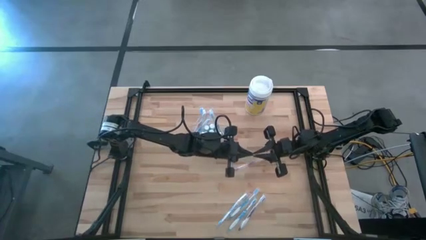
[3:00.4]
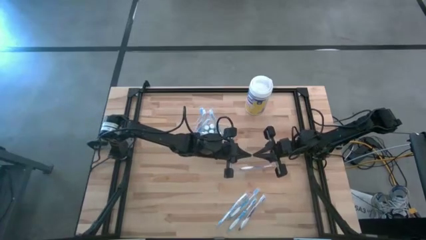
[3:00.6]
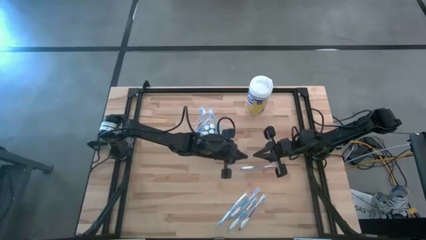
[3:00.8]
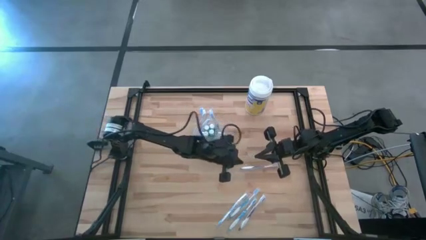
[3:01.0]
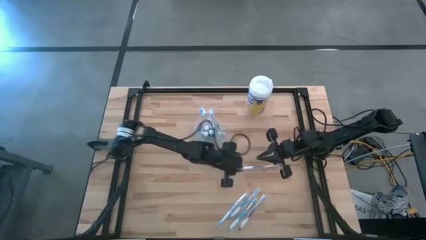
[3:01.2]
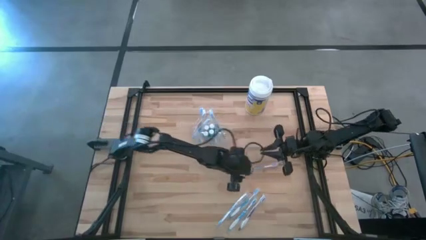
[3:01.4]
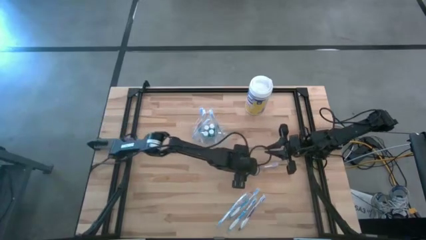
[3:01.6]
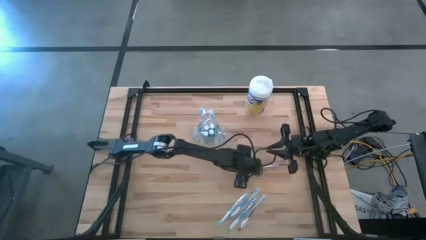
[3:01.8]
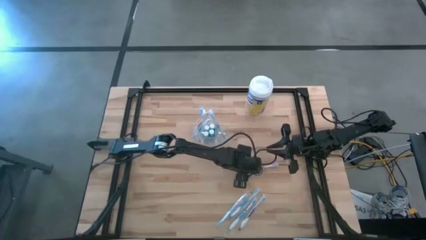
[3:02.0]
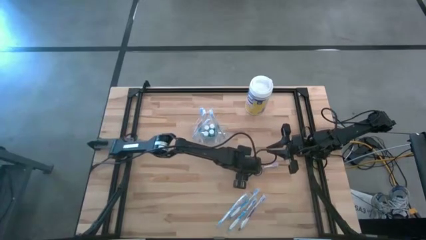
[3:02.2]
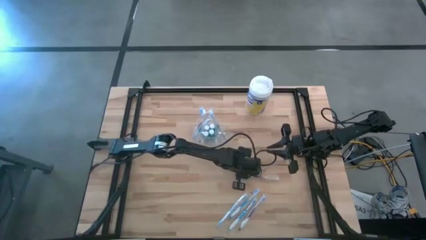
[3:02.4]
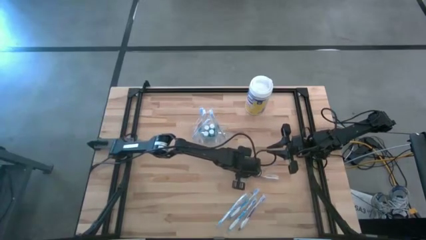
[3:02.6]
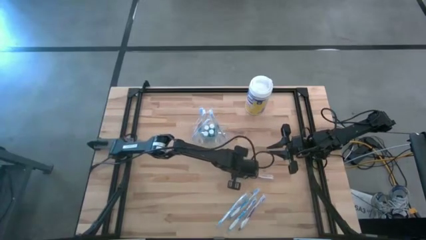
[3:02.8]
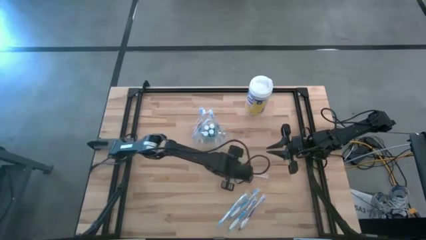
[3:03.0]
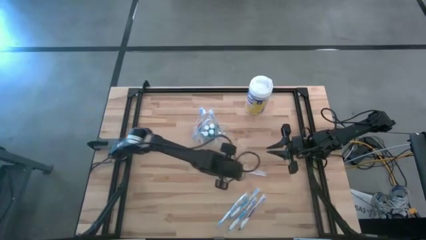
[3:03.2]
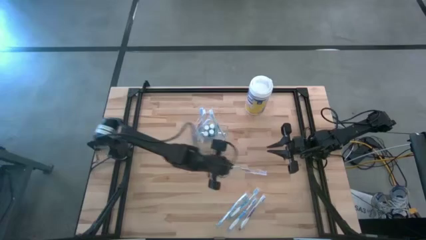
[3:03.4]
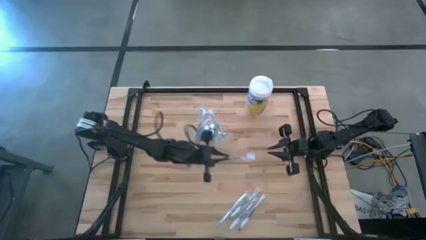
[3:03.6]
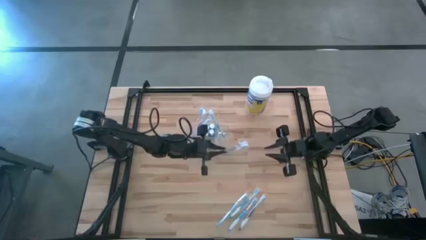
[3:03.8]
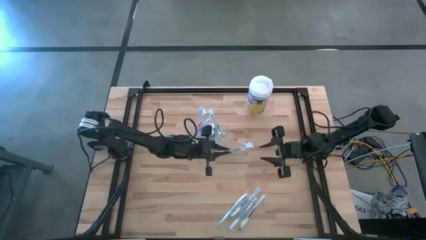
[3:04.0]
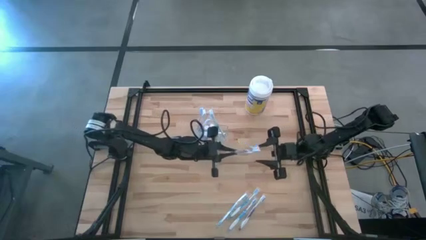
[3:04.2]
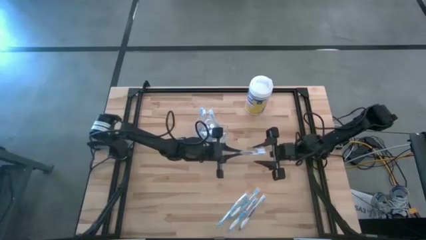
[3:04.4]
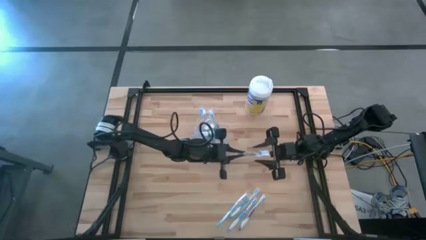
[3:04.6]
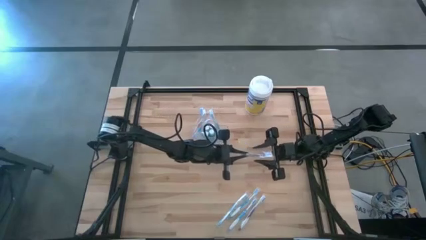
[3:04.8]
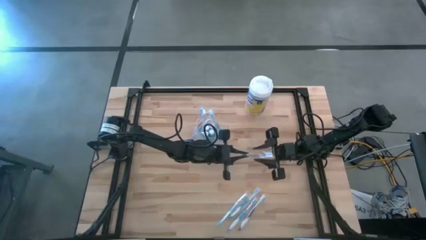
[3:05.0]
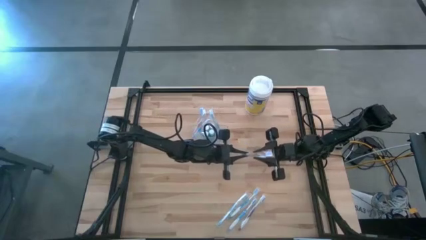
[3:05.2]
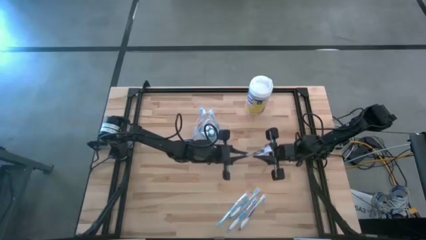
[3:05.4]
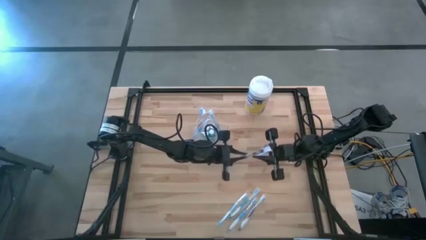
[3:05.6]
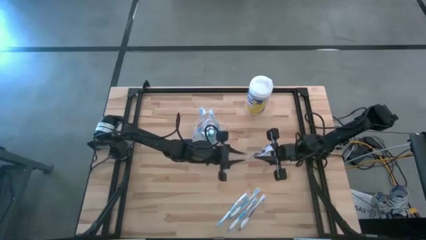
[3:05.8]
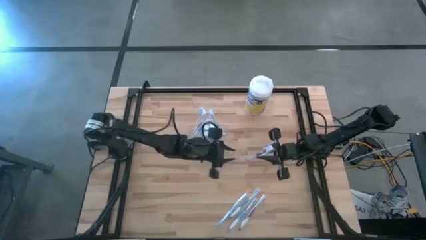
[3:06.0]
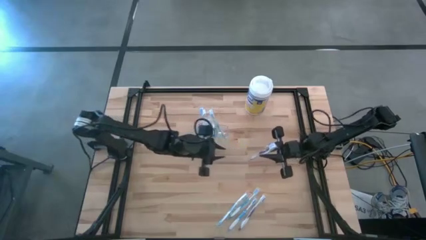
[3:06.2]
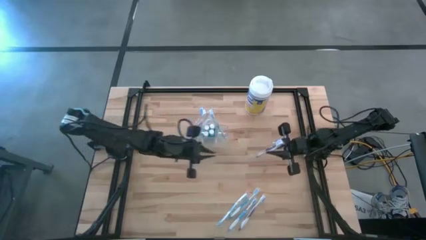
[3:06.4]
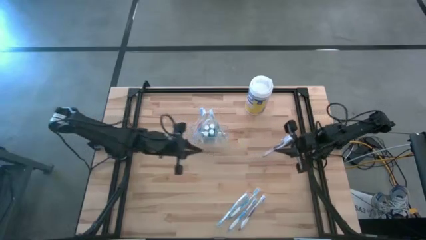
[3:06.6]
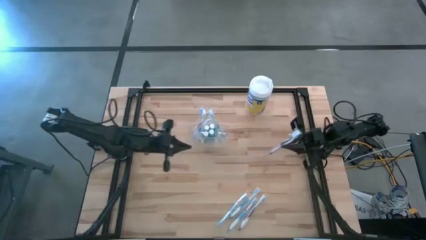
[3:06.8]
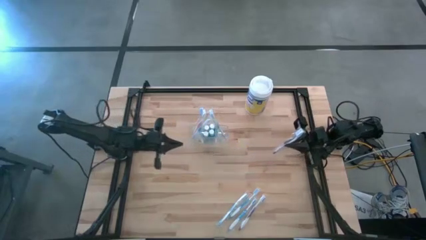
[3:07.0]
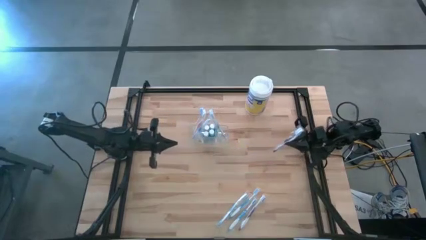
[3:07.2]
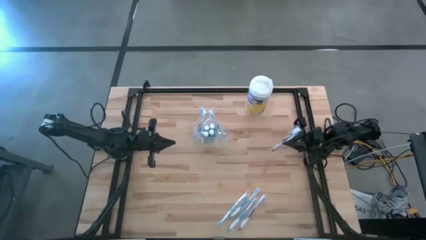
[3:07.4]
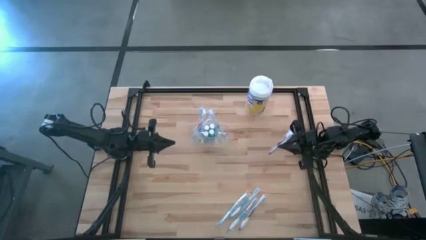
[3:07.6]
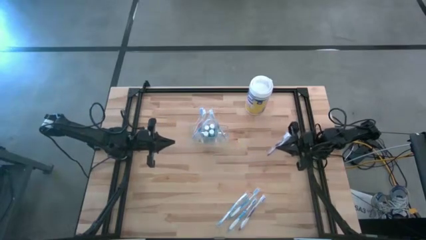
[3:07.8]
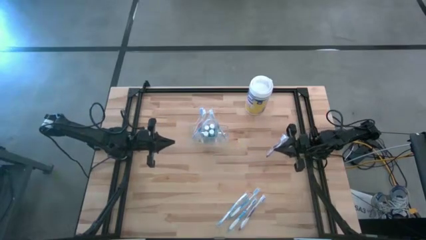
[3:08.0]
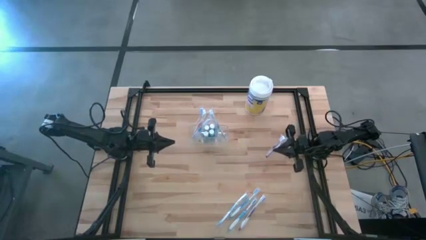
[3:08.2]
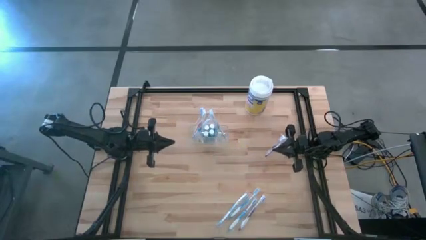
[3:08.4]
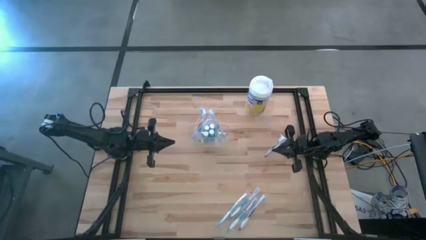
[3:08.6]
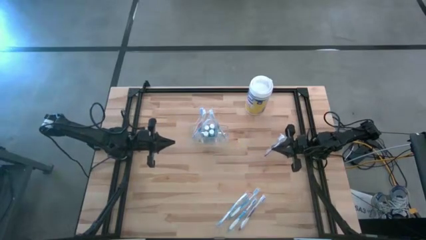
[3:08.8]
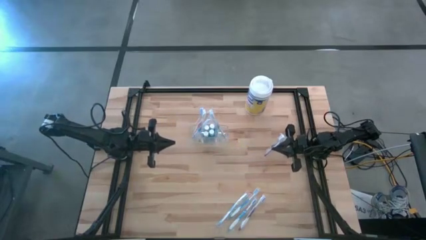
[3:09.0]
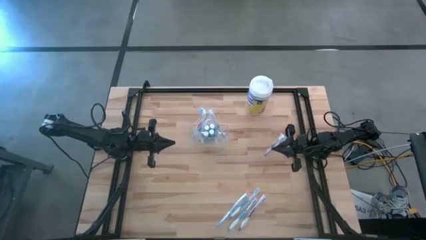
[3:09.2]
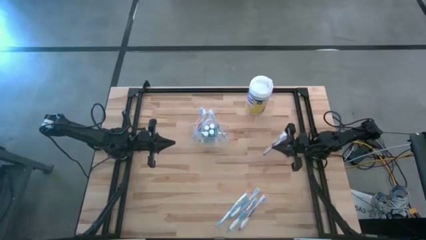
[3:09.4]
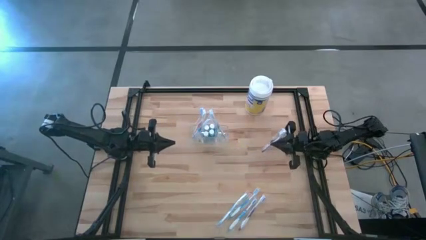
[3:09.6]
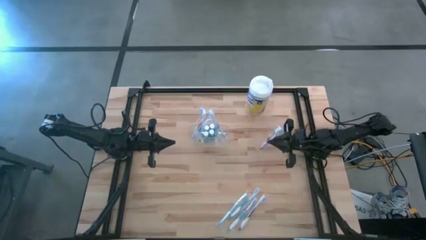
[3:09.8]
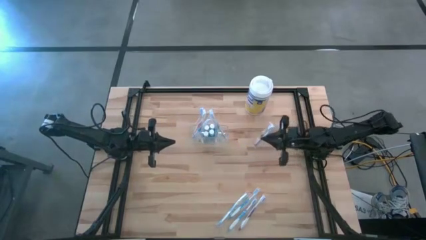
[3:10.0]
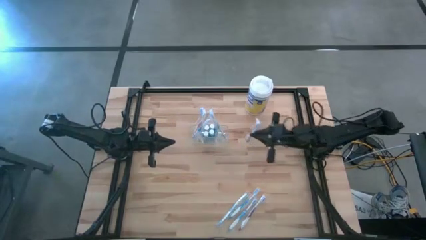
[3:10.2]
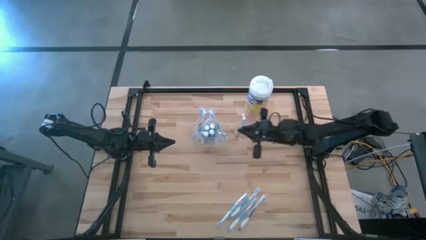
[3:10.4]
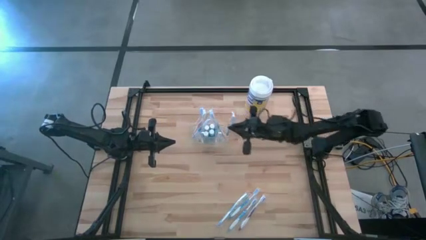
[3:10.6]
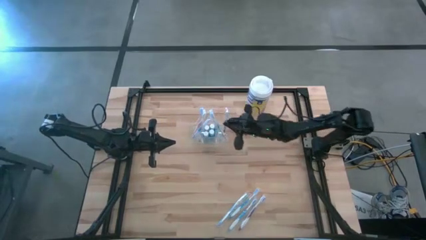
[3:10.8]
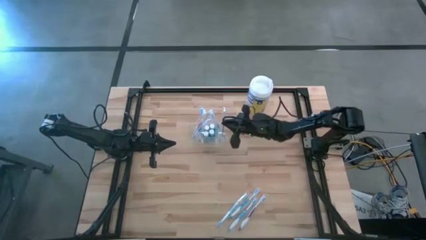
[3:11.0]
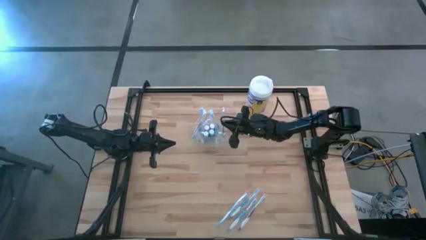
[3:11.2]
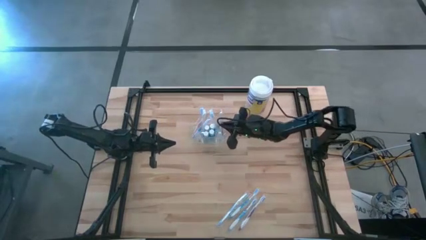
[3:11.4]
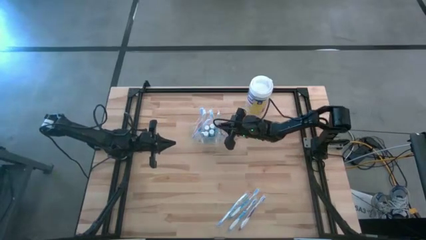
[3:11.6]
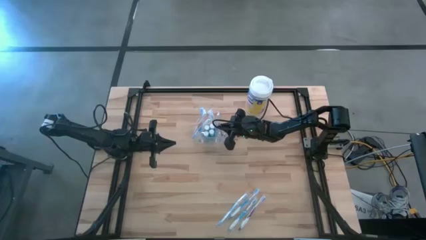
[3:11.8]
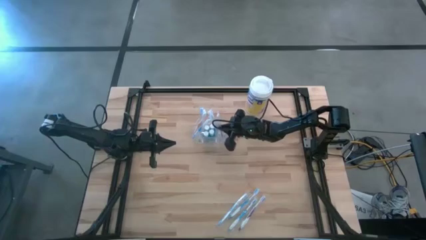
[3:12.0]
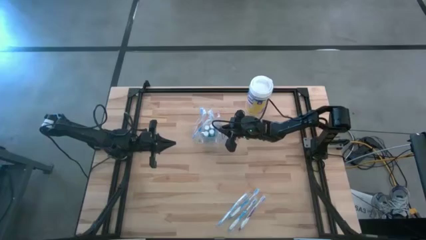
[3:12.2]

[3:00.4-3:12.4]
Task: Pick & Place toothbrushing station
Put the purple toothbrush into the transparent organizer

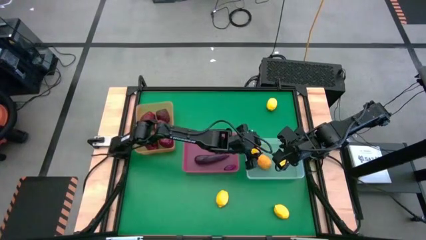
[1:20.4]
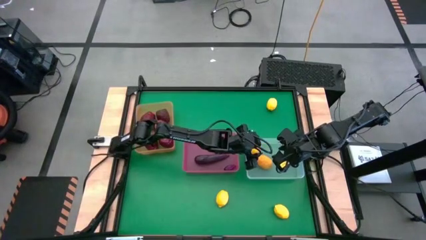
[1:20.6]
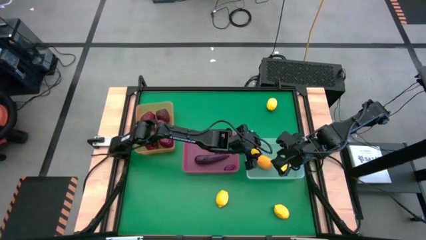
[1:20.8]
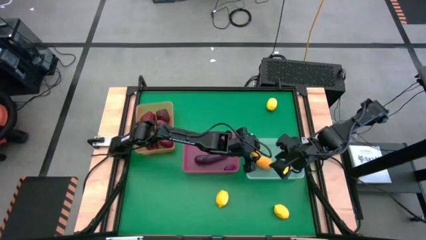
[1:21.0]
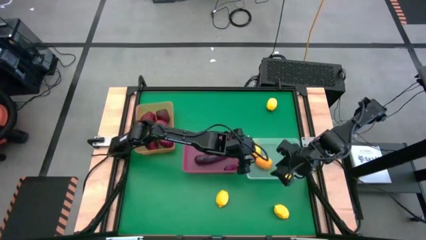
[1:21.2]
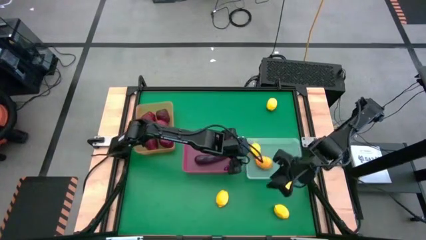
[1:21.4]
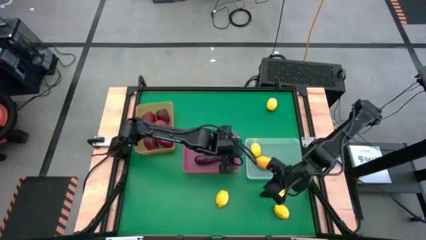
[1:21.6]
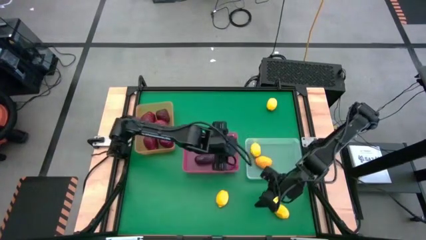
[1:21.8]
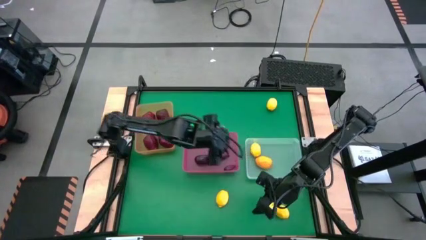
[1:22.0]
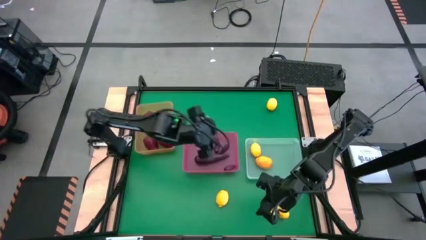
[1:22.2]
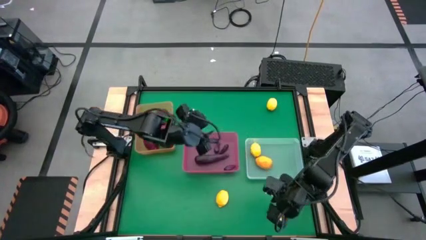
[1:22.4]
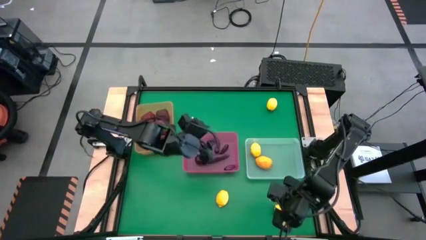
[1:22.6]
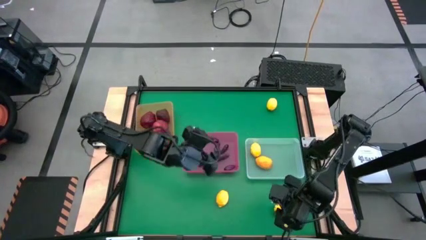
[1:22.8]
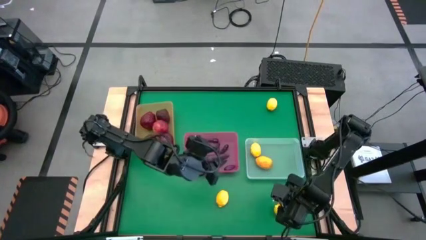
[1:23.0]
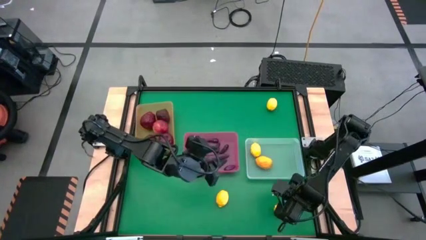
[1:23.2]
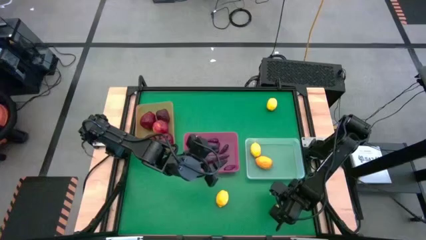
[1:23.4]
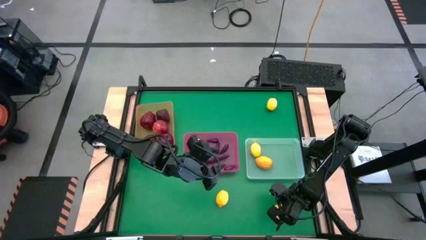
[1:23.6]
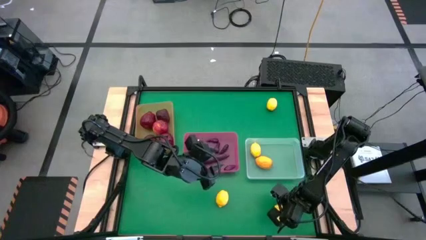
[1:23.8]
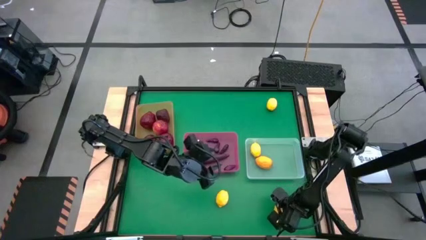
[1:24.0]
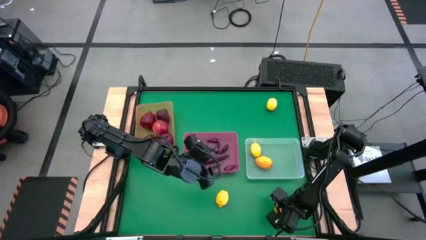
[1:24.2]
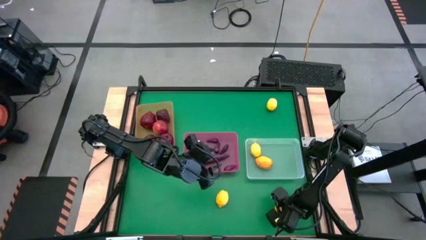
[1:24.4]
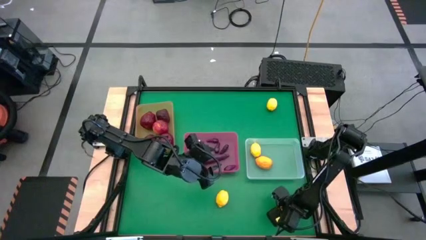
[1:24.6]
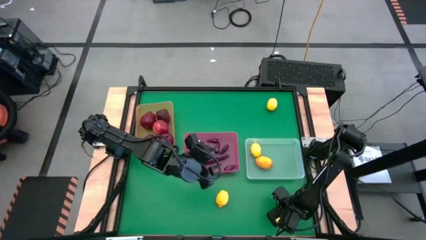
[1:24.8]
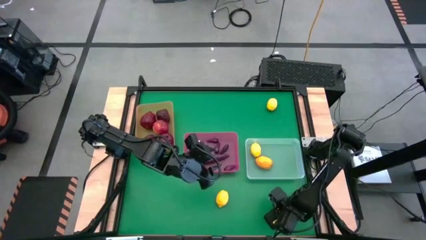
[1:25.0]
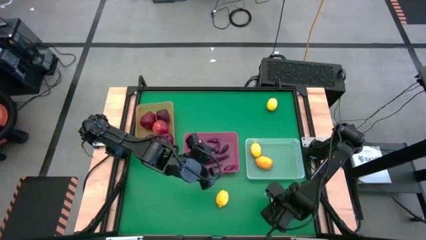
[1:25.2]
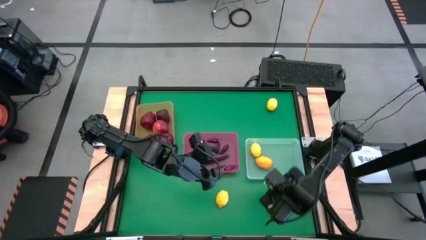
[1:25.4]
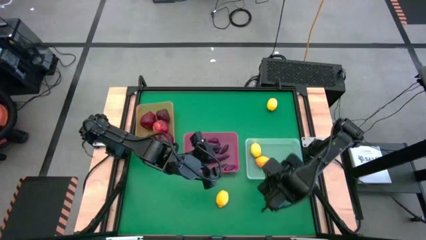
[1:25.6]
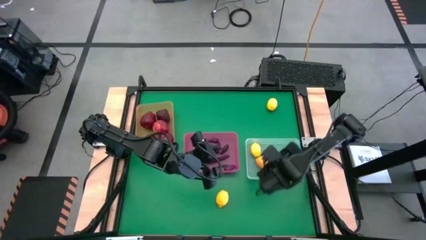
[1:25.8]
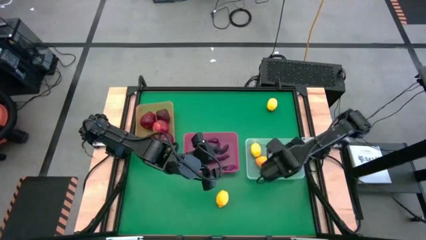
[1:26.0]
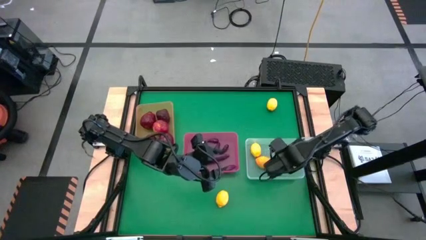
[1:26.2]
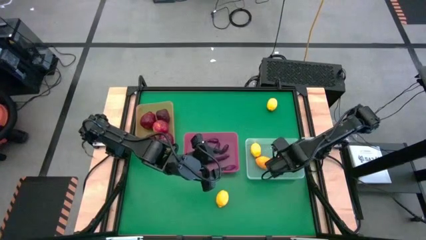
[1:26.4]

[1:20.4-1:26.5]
Task: Sort produce into baskets
Put the yellow lemon into the transparent bin
